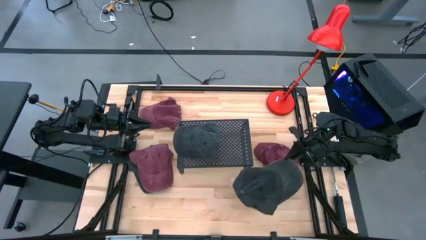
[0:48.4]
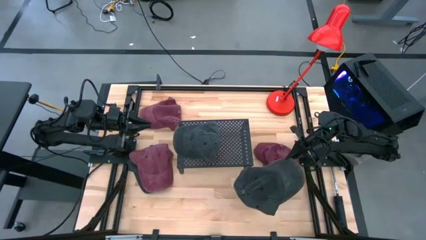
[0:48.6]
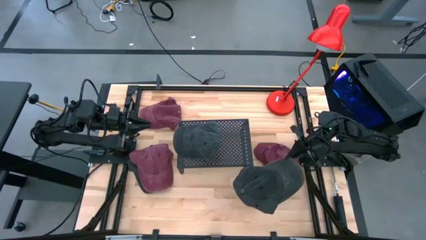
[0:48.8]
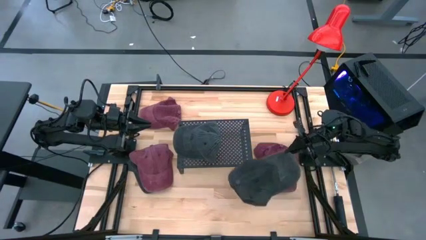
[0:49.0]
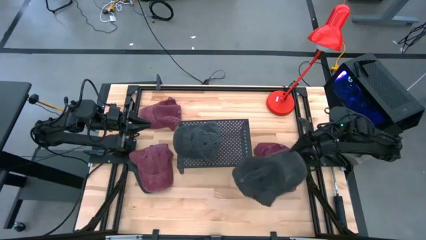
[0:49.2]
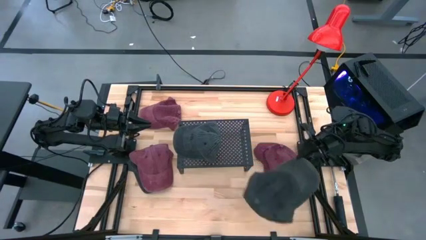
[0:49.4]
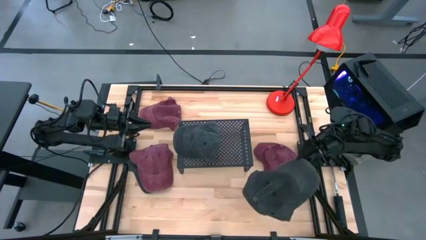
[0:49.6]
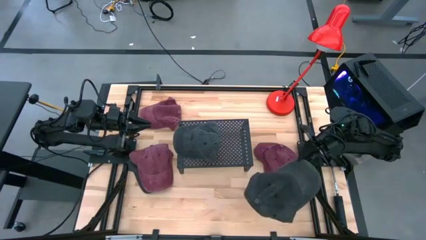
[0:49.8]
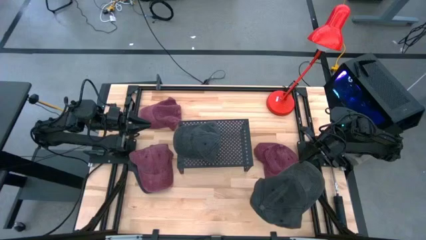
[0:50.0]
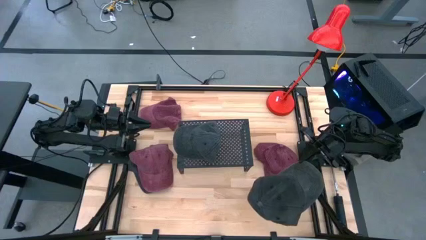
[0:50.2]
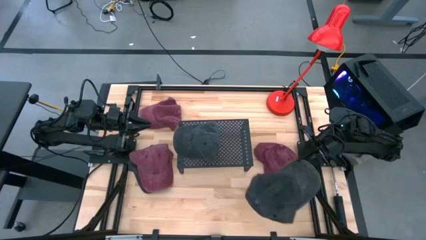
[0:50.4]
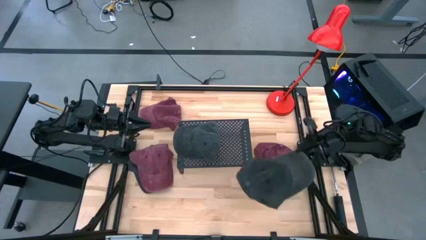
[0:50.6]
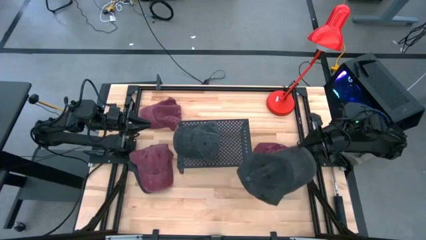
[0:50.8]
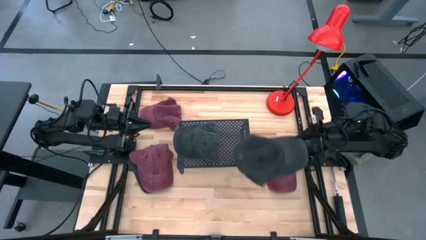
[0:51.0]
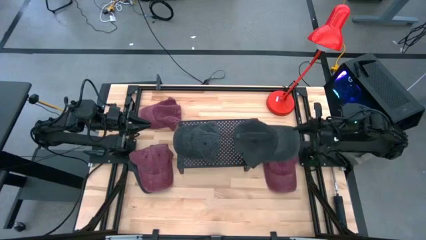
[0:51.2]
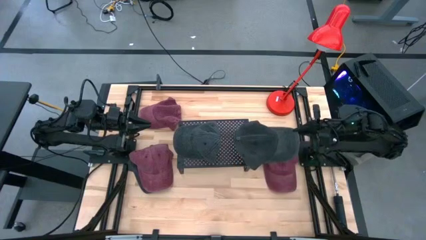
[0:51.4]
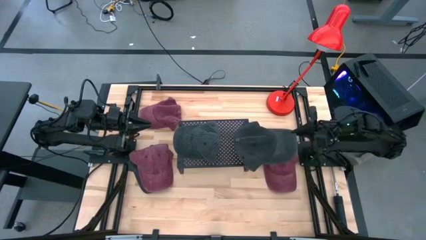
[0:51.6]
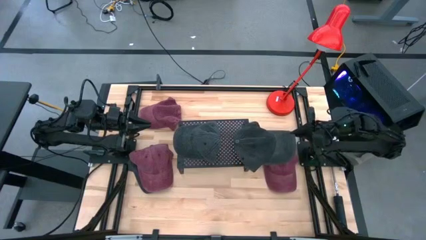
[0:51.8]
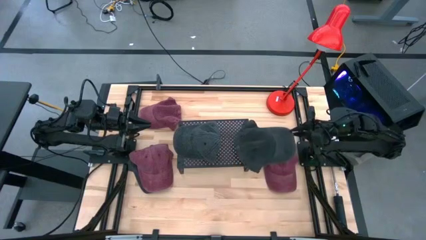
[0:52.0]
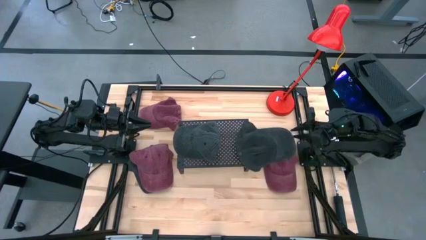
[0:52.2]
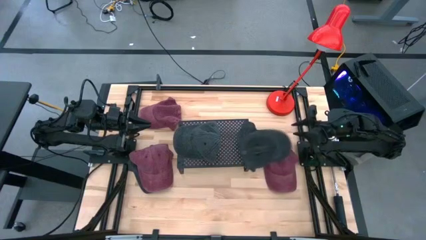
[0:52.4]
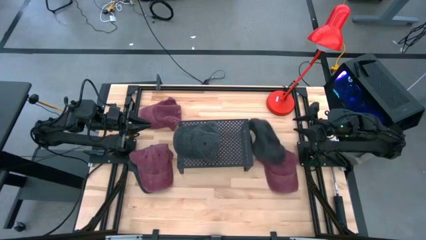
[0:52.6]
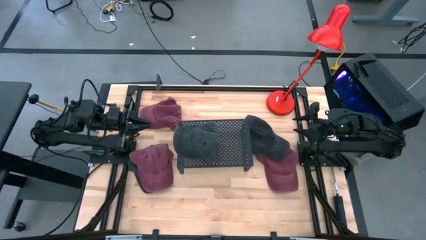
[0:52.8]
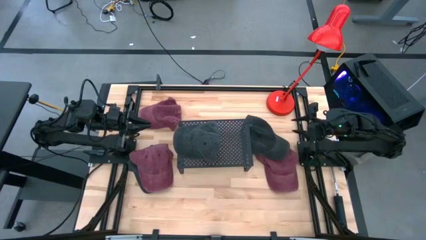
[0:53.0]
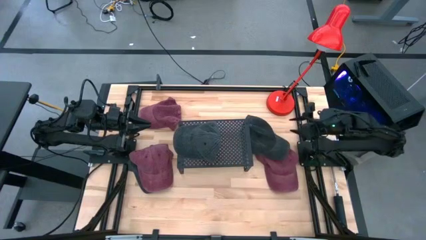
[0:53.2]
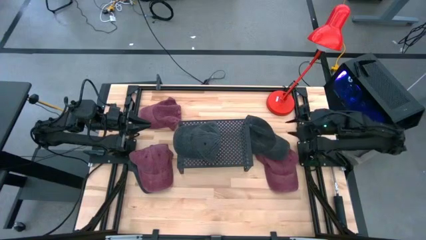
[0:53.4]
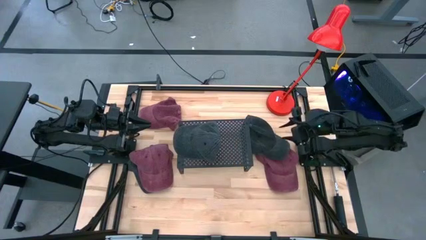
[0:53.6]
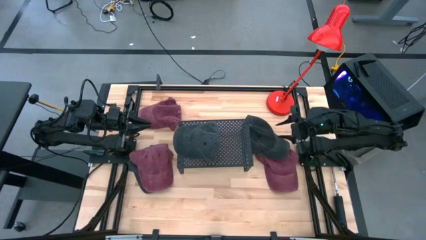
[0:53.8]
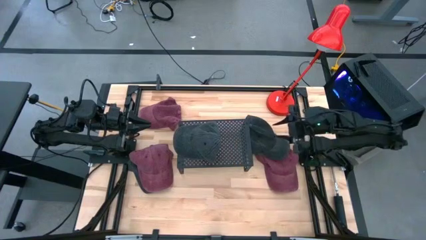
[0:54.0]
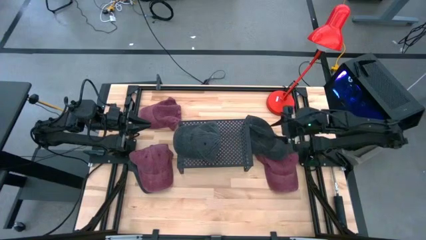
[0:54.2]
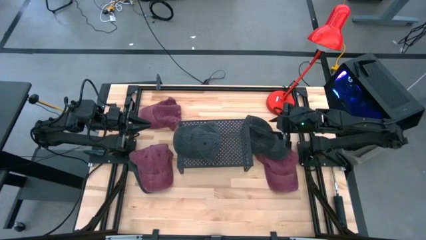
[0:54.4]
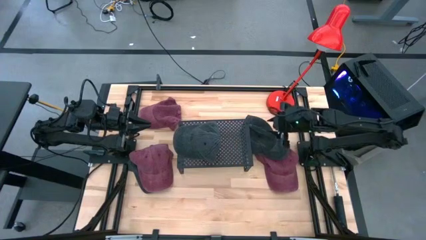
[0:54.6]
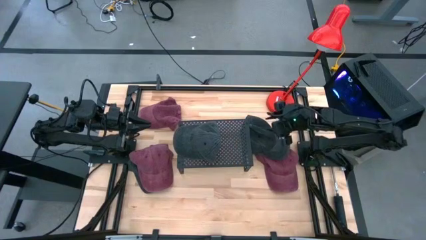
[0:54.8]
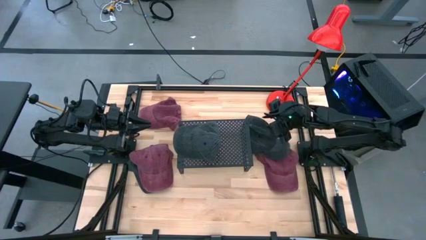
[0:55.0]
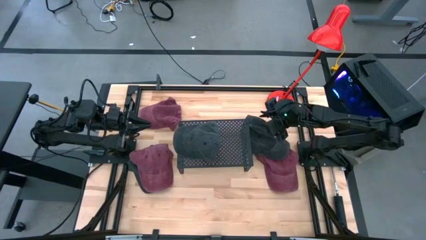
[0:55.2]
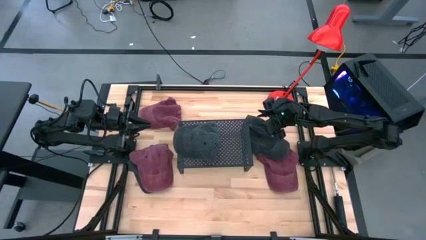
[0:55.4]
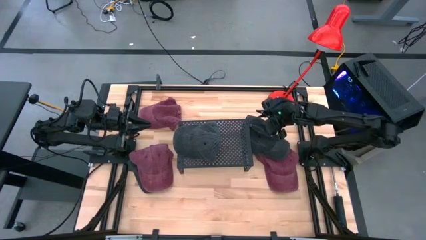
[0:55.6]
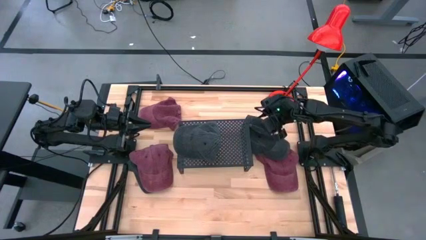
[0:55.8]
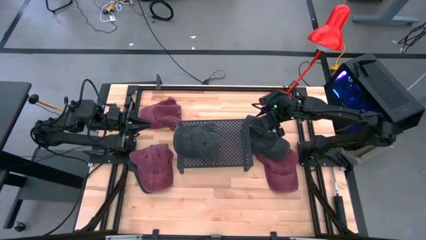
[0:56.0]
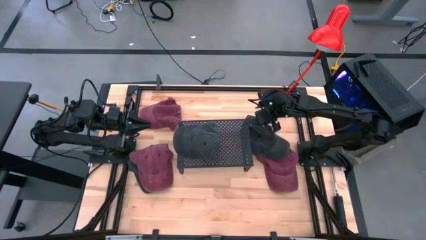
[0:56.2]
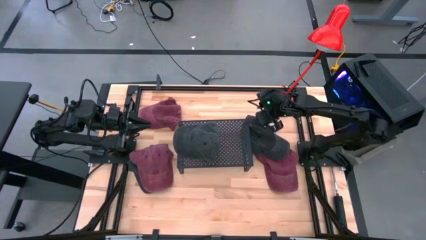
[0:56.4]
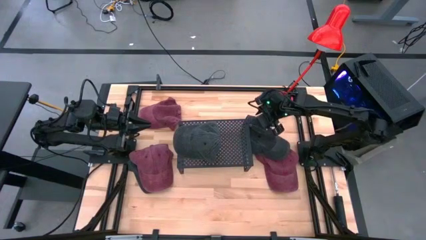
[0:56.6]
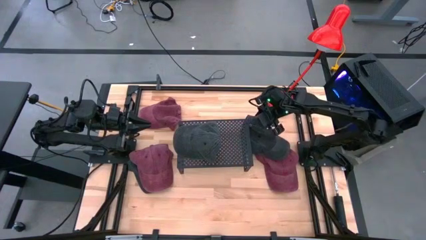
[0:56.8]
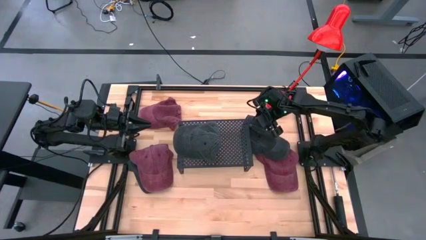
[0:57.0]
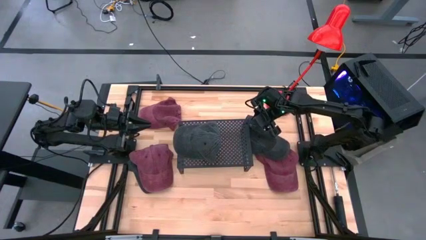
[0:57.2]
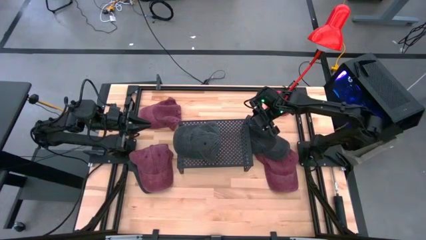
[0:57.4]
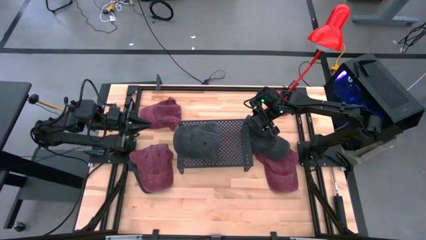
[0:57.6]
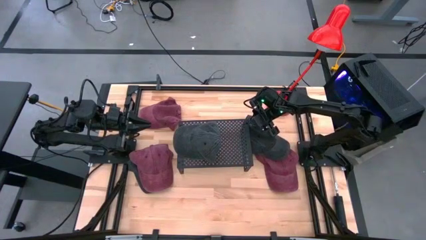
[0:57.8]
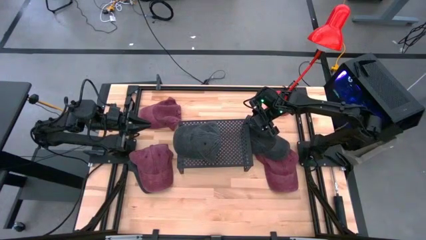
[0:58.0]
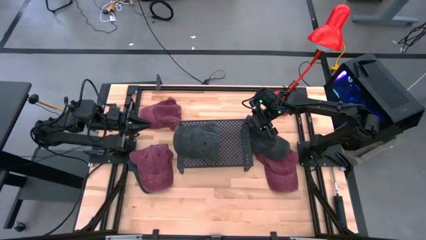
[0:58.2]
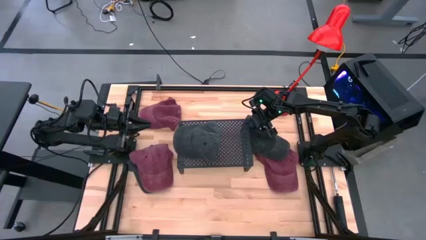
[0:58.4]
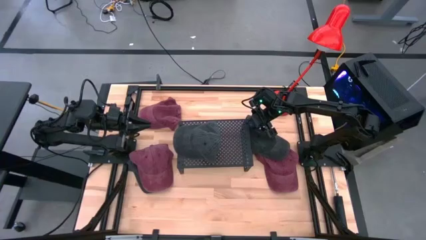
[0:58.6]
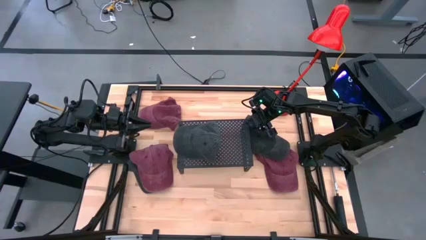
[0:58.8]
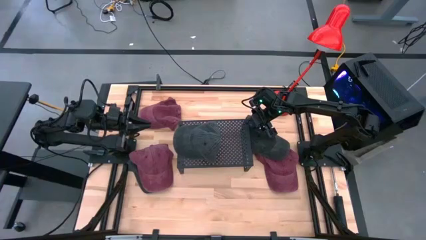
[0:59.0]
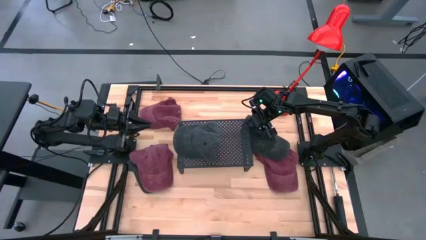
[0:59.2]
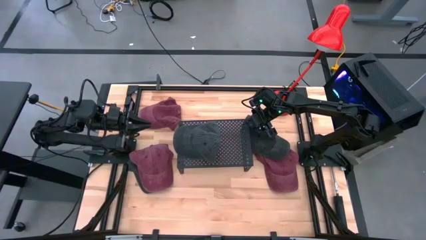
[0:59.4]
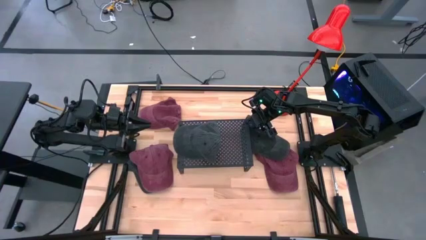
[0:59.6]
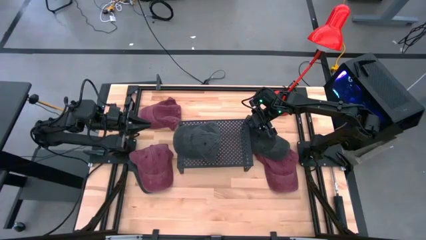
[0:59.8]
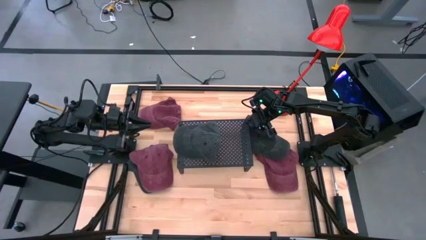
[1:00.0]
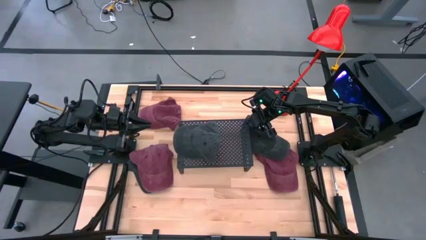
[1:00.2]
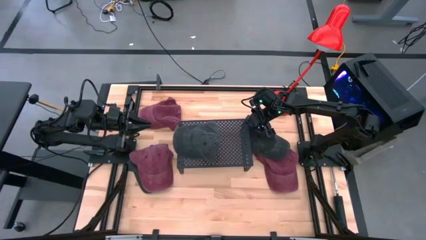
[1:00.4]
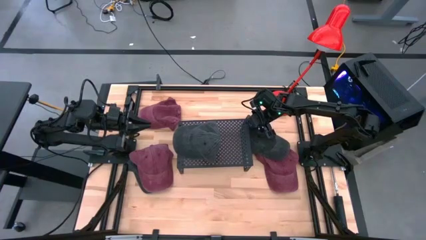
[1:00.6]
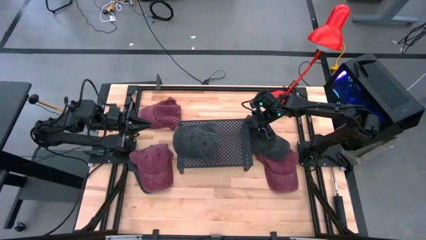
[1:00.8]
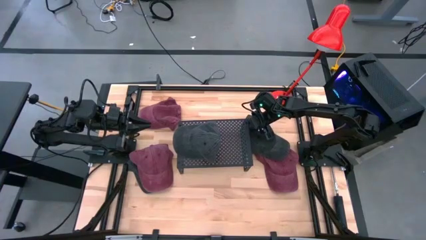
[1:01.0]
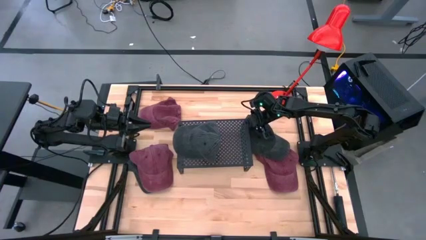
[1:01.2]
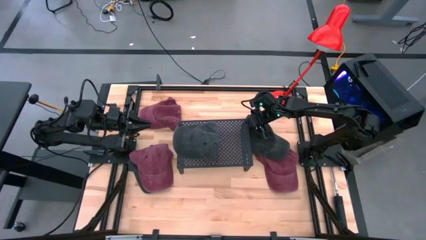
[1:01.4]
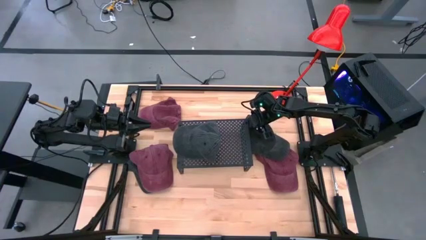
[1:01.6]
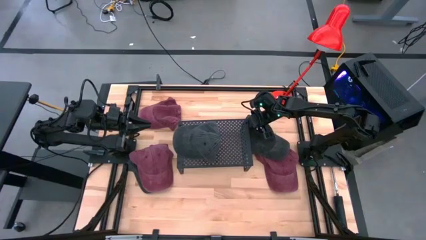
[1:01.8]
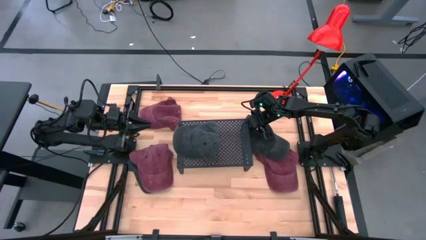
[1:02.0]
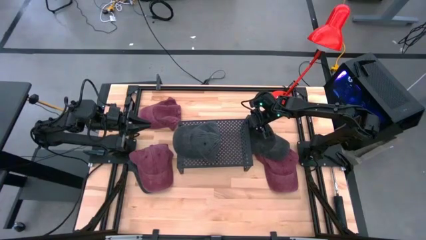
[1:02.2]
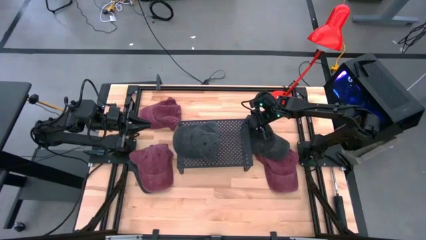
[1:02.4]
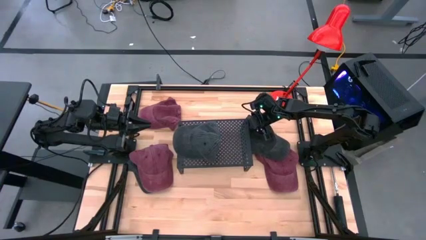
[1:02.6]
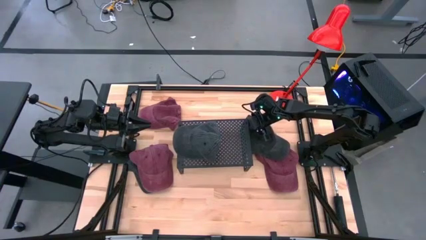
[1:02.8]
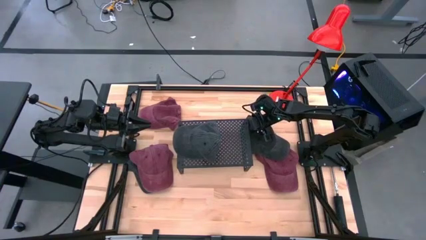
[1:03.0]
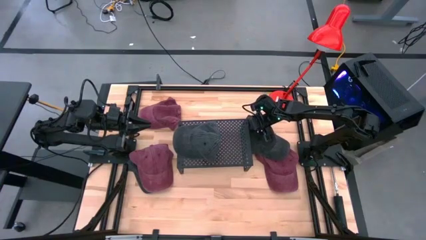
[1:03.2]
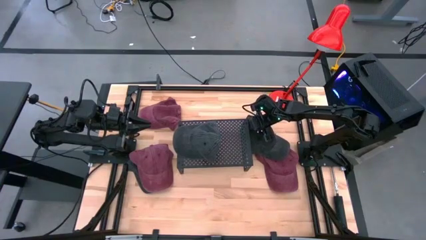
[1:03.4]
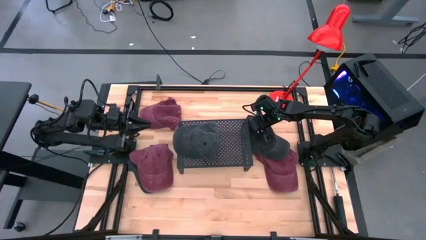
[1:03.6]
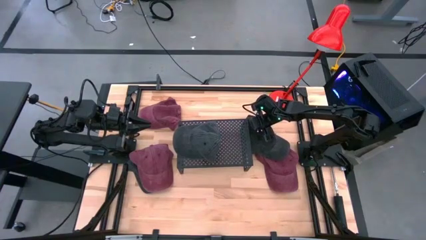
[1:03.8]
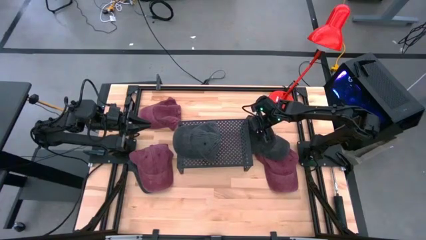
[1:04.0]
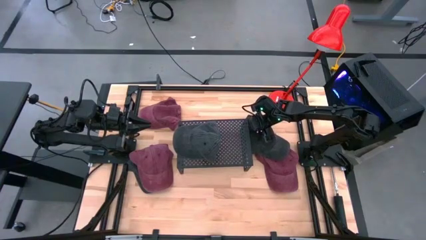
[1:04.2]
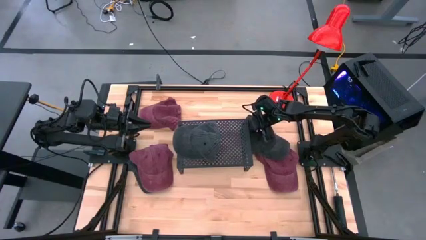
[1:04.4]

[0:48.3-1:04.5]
Task: Pick & Place hat
Stack the top black cap on top of the black cap on the shelf

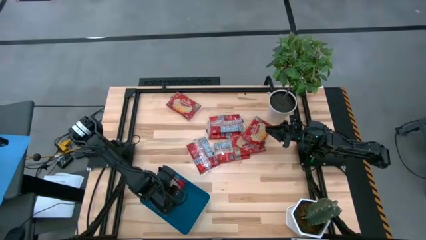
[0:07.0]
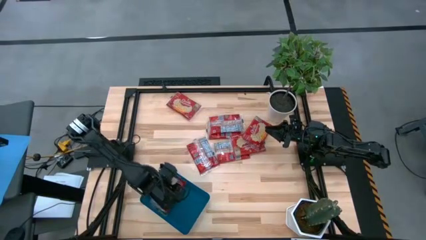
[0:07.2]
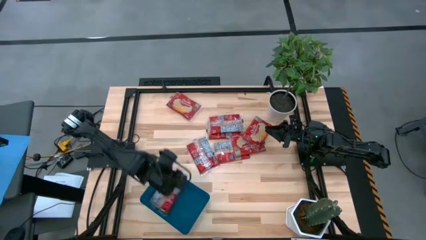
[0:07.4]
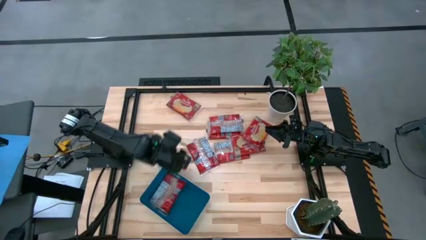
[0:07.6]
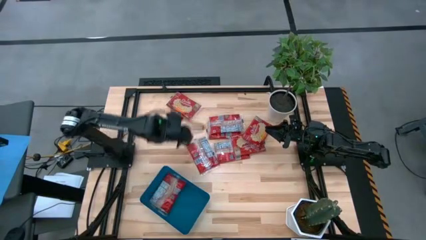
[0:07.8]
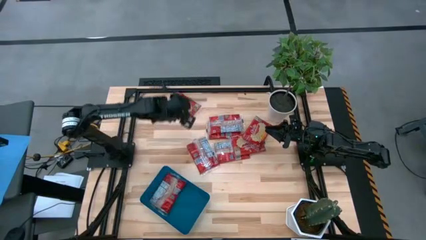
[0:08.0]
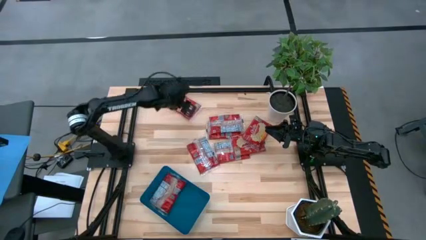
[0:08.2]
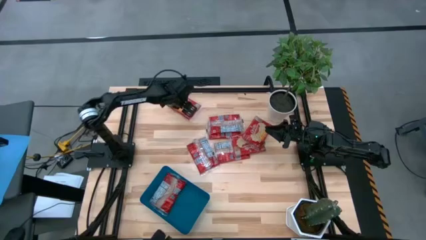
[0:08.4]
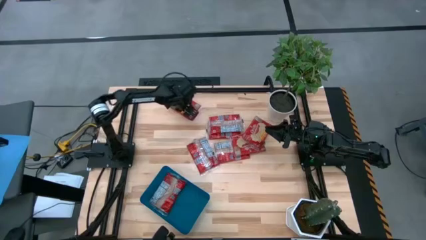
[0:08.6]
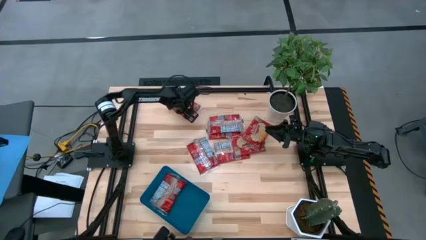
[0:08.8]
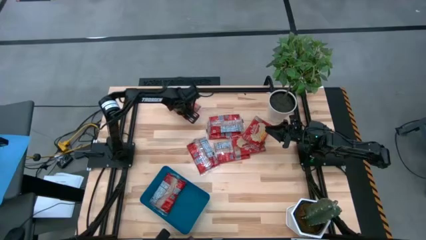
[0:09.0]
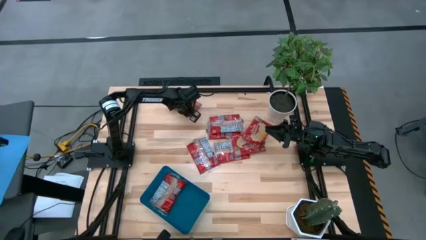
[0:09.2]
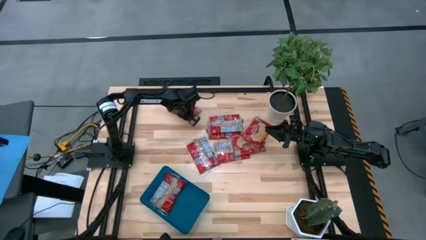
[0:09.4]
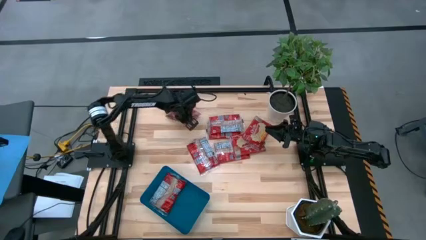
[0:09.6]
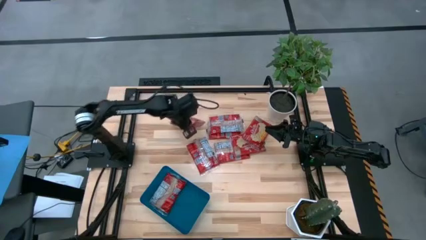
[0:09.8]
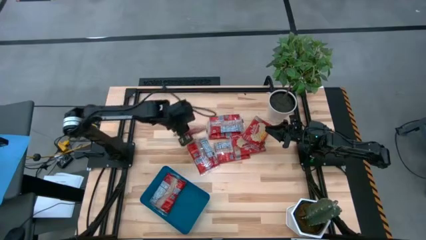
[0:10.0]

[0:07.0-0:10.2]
Task: Sort popcorn bags into baskets
Put the red popcorn bag into the blue bin
